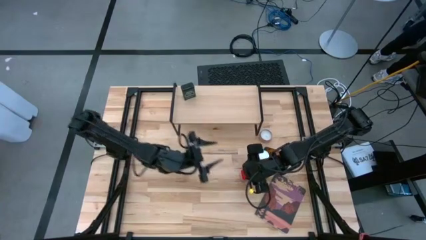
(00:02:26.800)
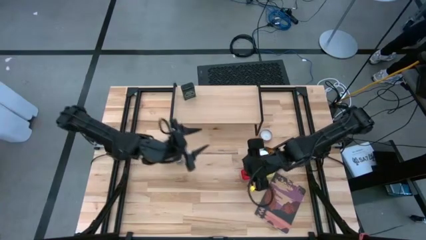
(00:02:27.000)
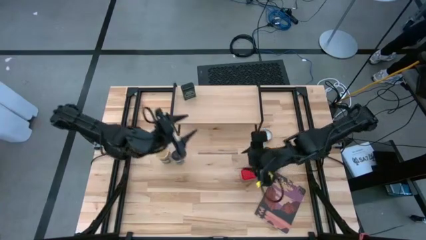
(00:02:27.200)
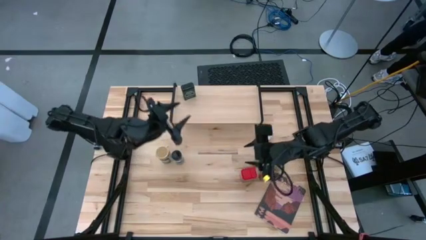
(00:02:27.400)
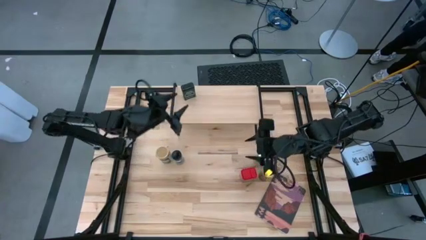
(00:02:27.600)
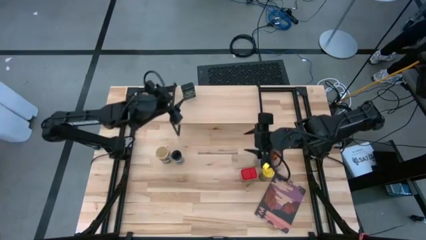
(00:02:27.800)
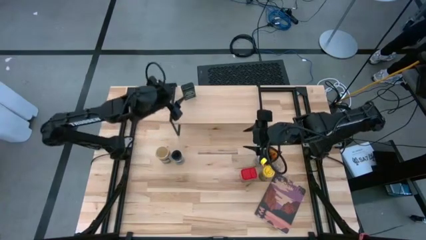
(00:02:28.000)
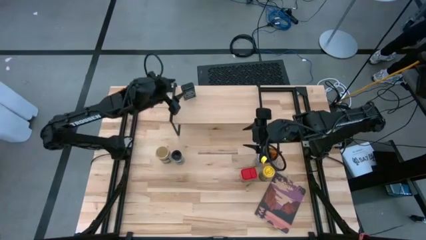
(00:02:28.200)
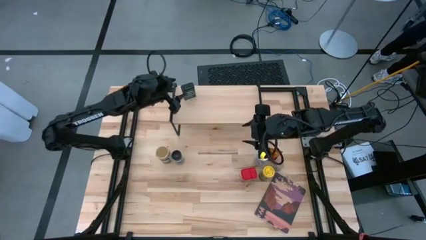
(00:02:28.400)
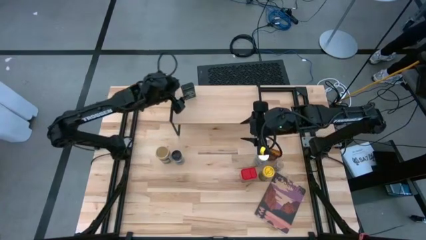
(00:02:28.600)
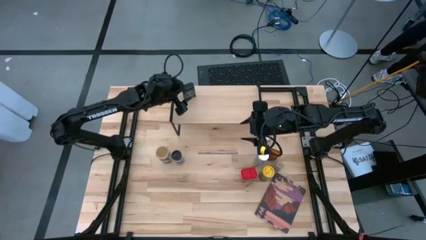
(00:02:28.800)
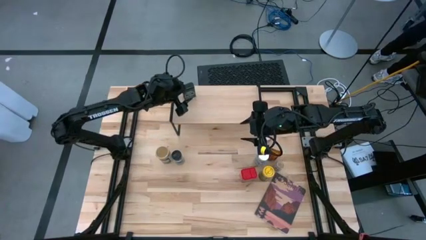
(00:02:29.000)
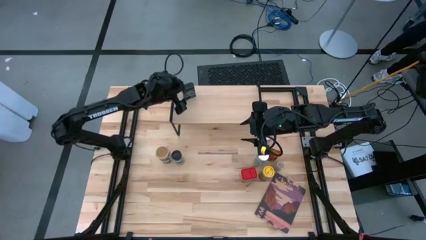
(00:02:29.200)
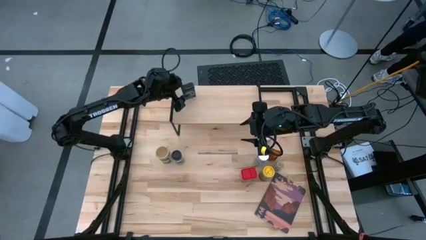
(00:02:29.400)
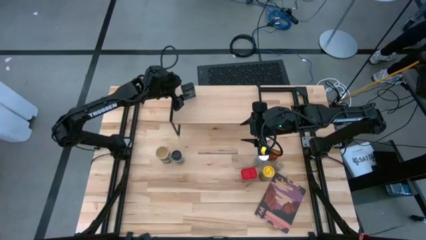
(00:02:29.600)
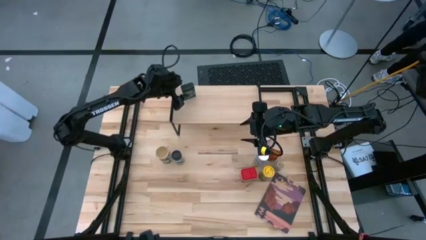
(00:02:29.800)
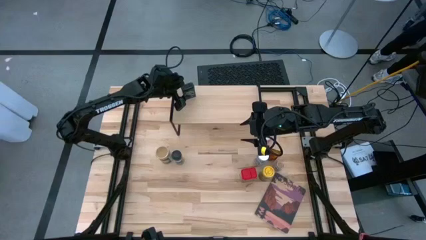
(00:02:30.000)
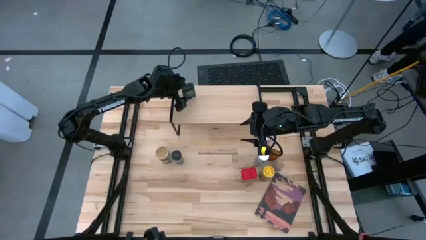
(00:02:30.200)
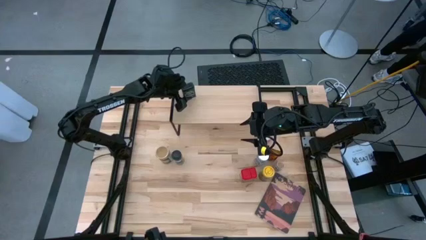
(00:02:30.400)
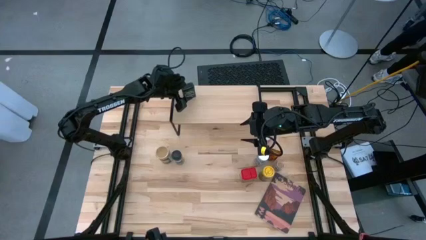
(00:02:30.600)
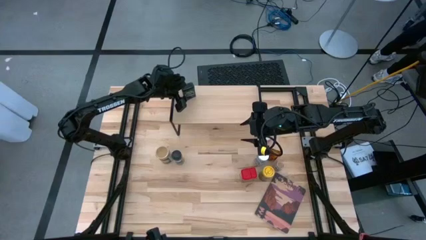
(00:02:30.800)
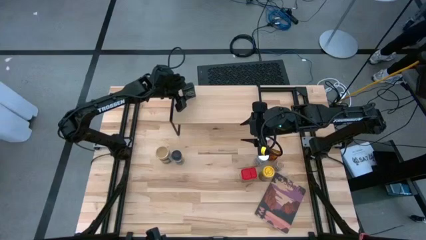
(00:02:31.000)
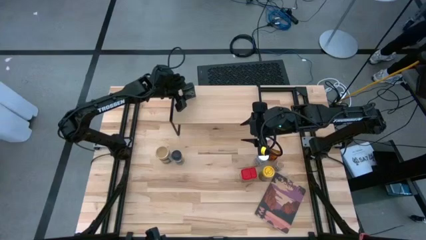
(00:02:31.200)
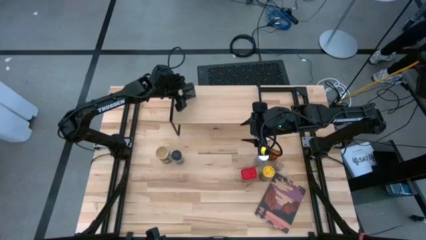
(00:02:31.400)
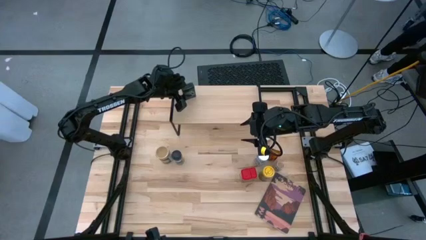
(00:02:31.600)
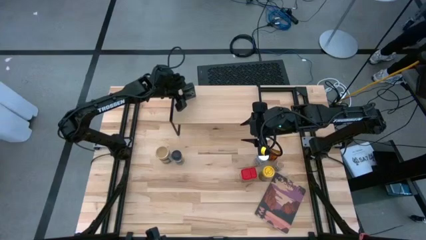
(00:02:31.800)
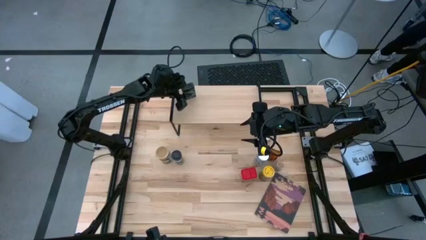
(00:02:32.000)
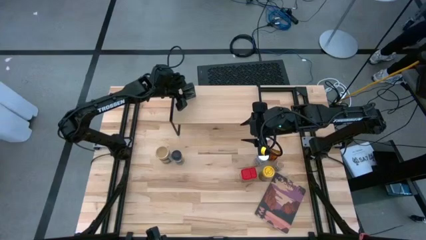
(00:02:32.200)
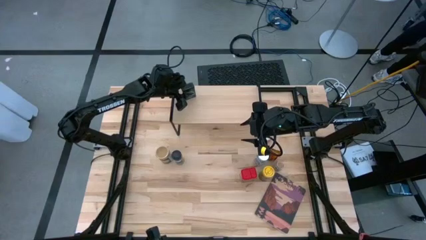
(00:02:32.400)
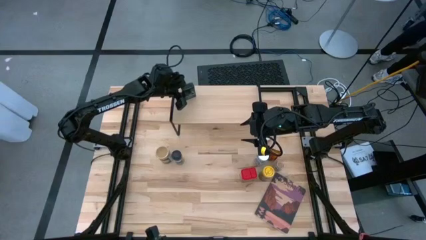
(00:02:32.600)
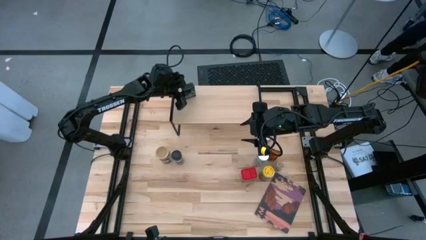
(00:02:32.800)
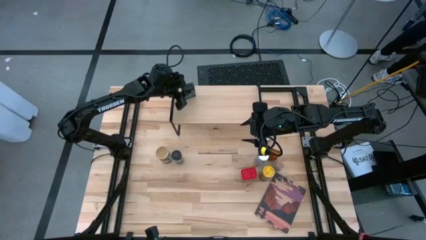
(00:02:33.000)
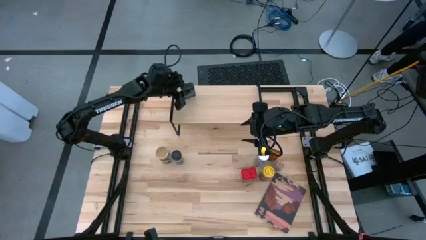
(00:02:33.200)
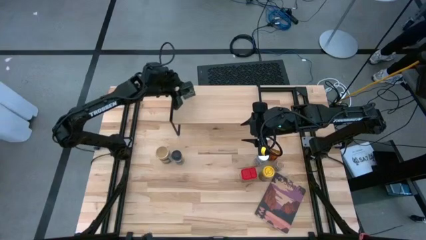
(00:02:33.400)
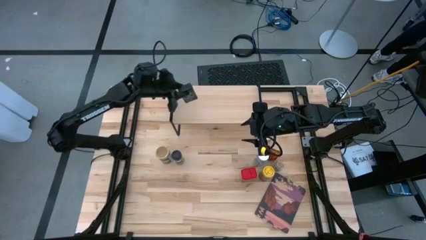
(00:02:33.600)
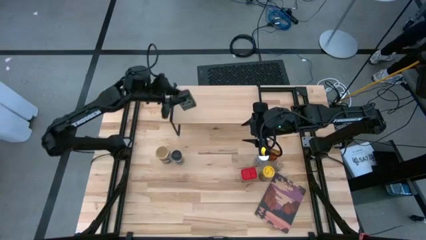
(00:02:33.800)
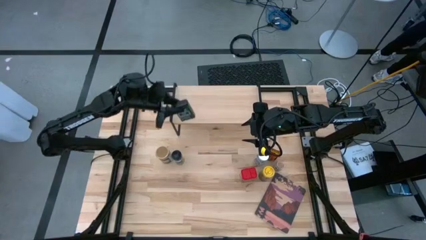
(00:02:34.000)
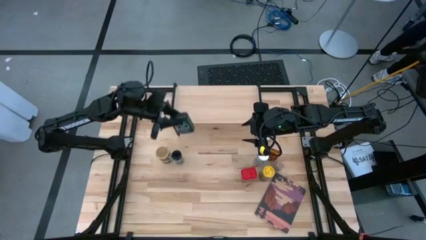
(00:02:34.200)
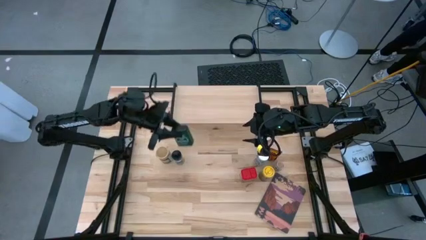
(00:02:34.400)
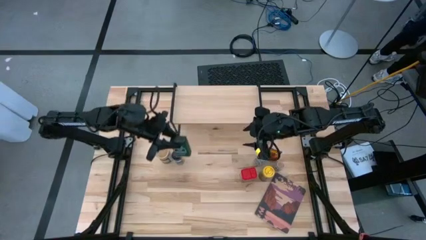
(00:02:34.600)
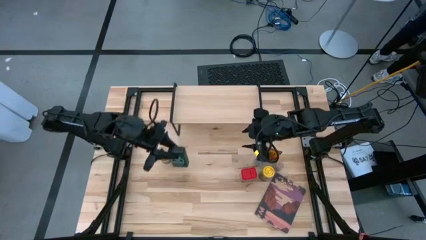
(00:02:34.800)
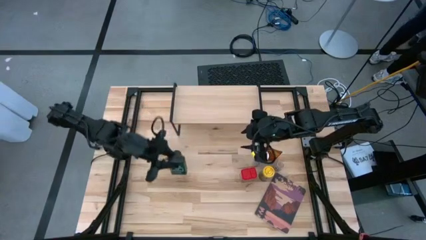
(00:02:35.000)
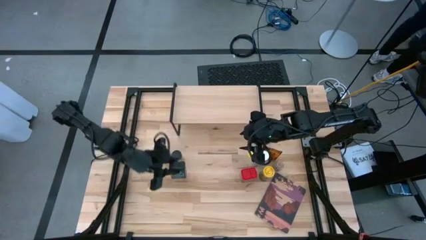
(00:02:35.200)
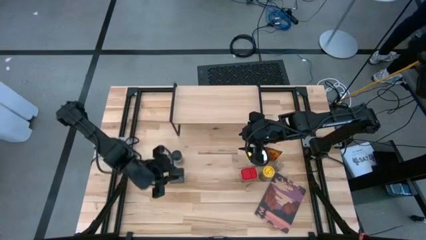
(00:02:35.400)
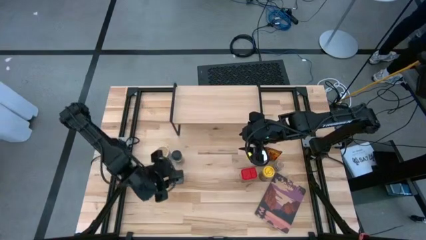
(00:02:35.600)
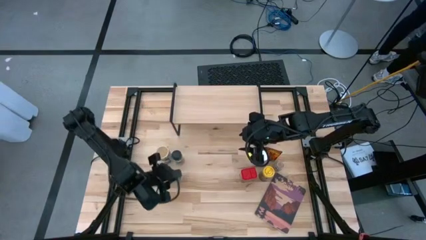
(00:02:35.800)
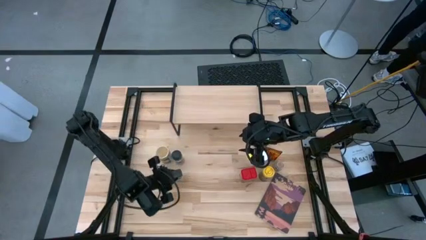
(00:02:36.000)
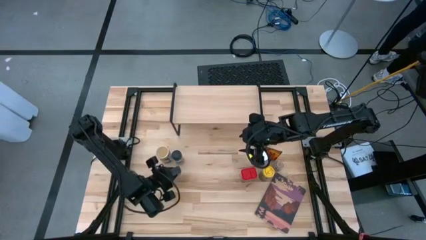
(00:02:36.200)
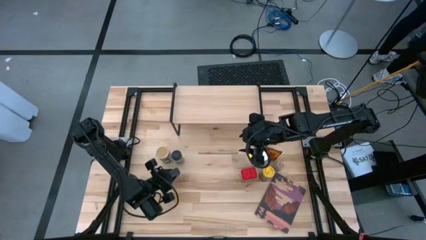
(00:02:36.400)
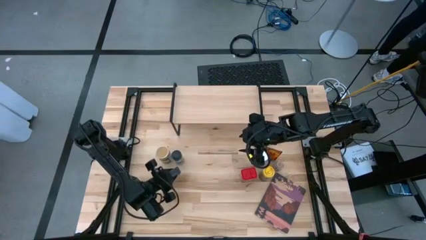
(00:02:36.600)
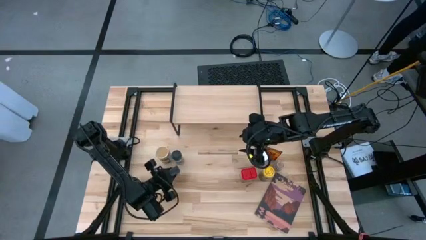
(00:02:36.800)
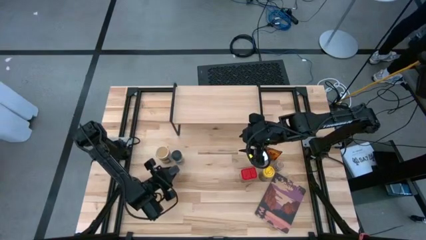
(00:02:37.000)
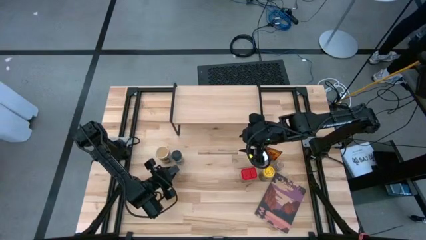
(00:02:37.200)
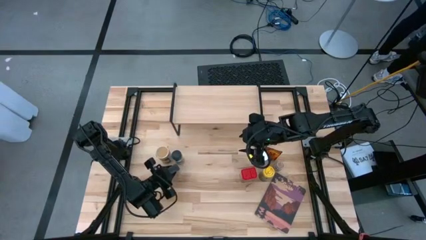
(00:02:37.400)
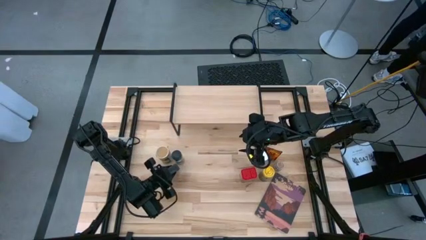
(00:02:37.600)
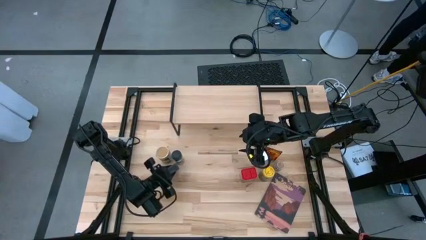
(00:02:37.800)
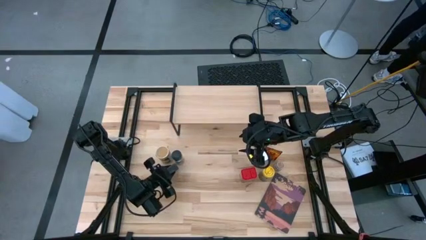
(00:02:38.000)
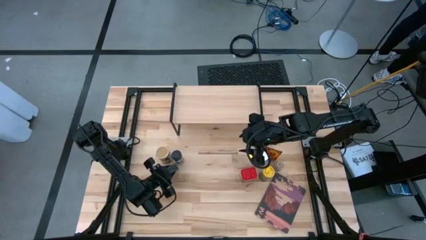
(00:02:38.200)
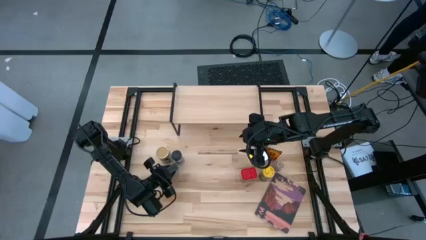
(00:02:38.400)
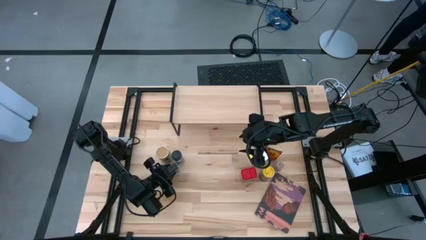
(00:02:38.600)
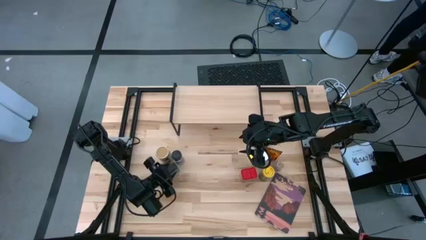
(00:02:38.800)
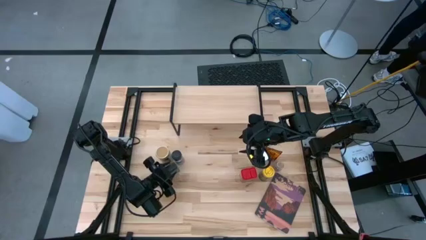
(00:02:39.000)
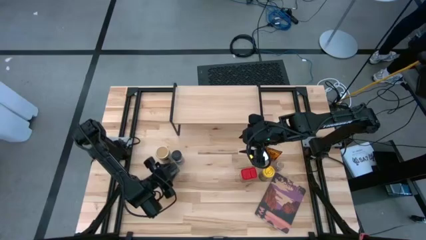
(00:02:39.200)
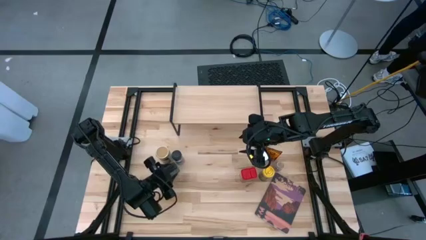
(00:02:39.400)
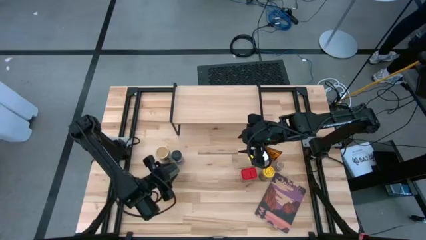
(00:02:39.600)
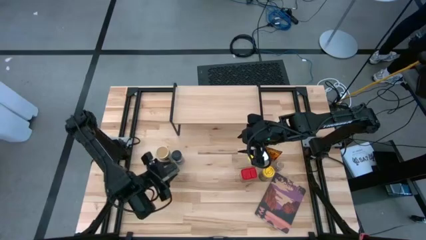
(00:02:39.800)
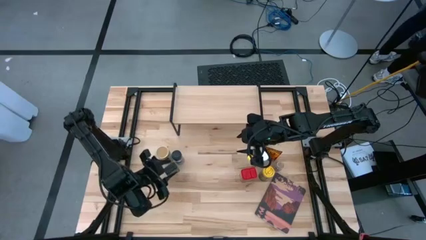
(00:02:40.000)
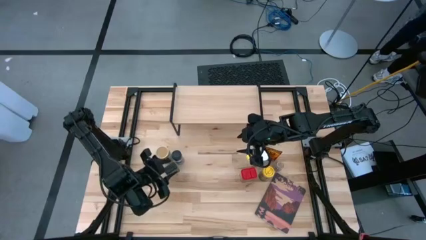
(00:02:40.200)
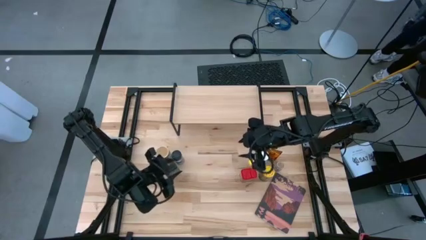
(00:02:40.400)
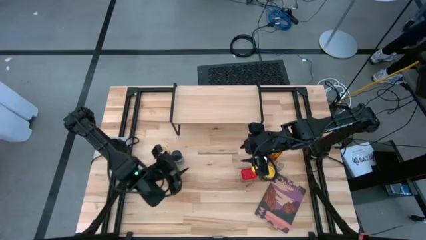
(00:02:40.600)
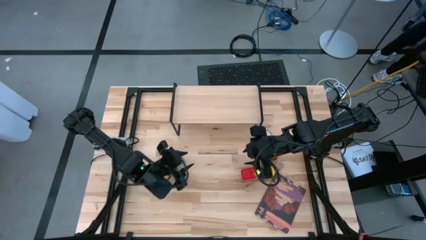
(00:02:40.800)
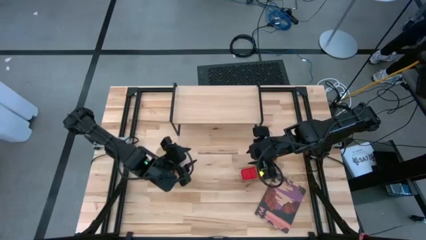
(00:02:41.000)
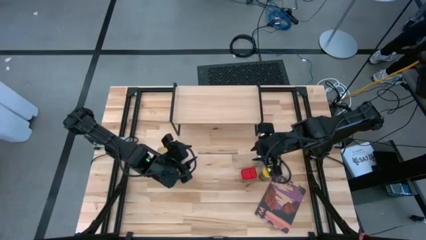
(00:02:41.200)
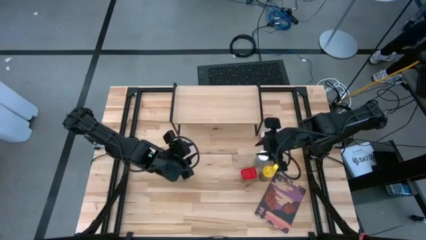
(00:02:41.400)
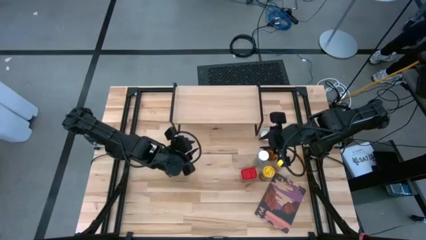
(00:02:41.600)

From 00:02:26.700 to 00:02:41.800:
Task: Shelf spices
Put the green spice can on the table
